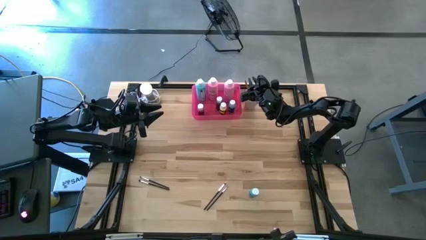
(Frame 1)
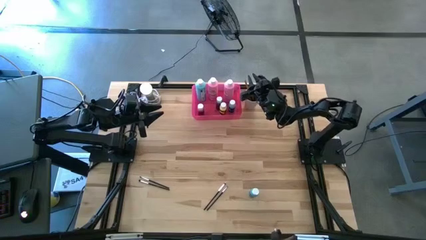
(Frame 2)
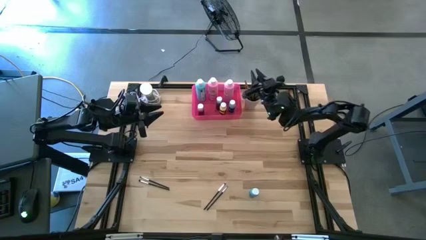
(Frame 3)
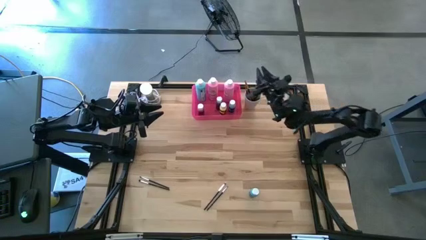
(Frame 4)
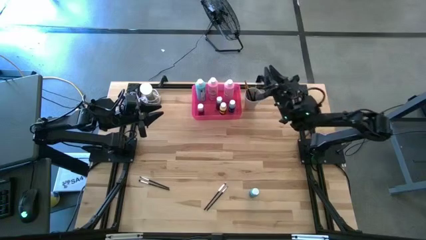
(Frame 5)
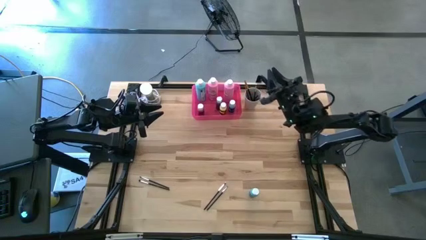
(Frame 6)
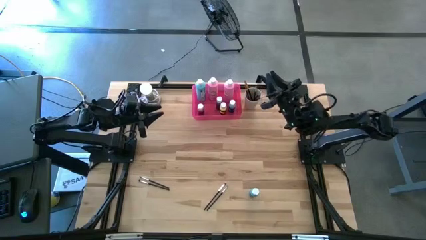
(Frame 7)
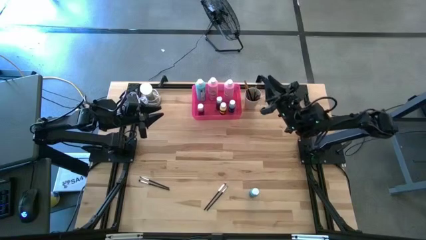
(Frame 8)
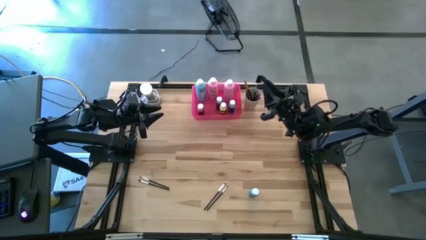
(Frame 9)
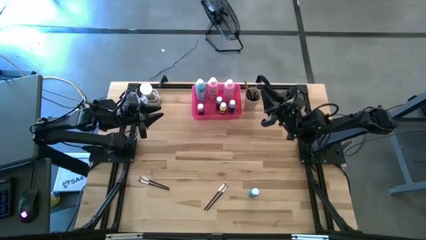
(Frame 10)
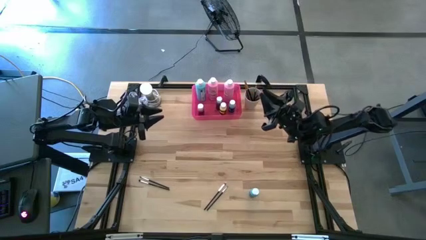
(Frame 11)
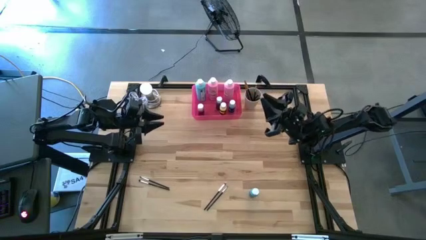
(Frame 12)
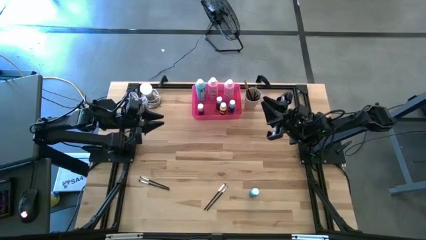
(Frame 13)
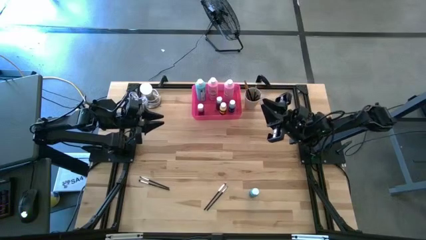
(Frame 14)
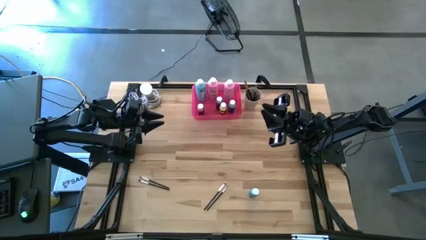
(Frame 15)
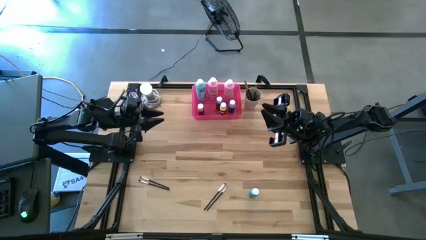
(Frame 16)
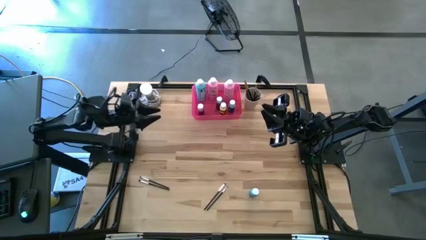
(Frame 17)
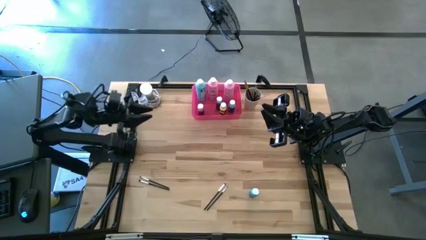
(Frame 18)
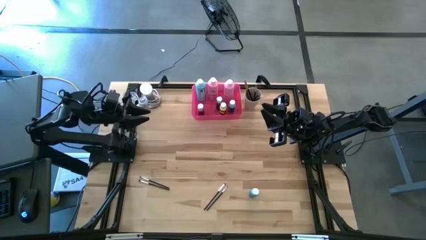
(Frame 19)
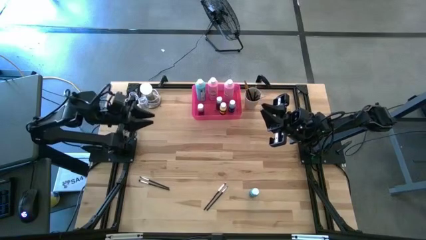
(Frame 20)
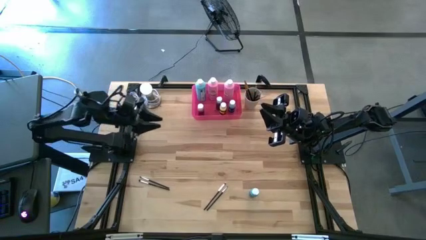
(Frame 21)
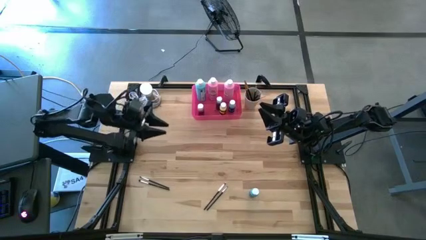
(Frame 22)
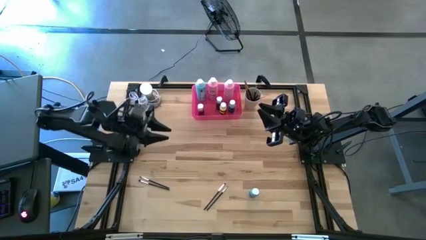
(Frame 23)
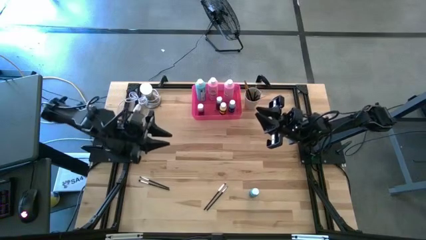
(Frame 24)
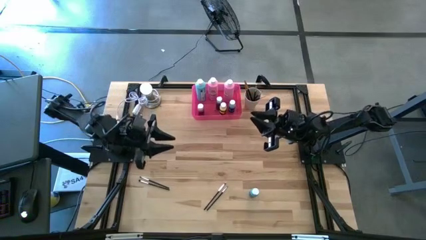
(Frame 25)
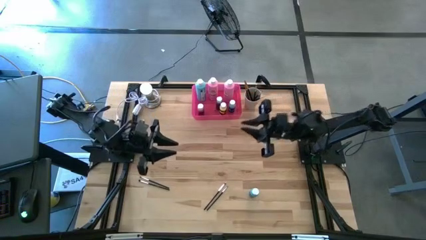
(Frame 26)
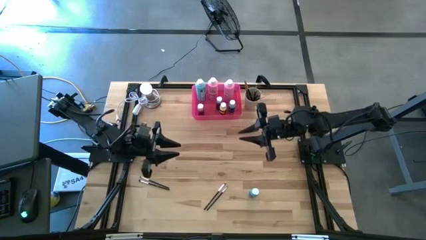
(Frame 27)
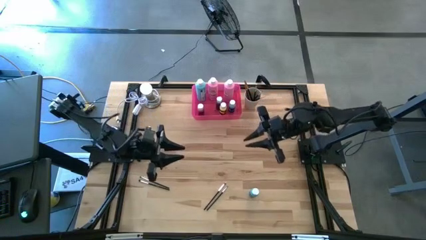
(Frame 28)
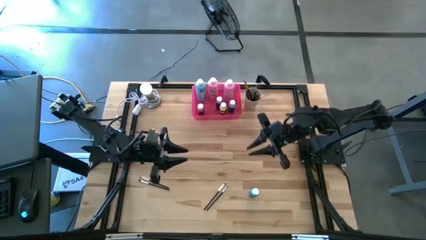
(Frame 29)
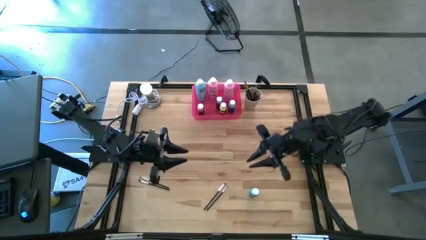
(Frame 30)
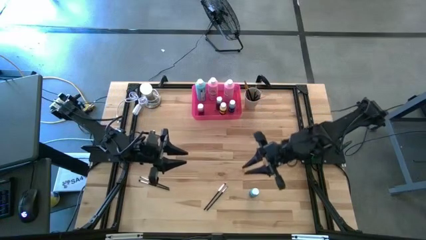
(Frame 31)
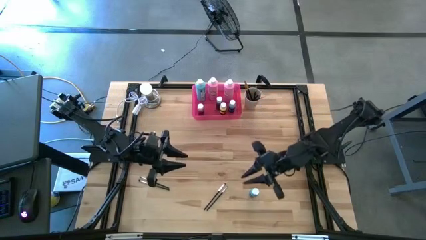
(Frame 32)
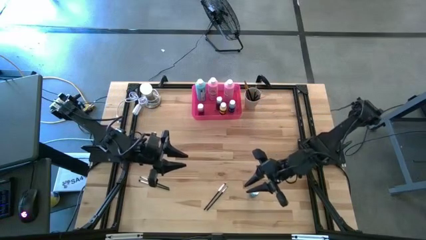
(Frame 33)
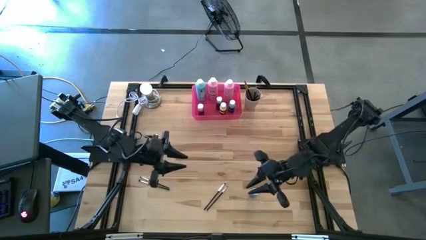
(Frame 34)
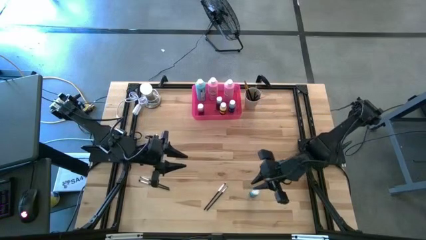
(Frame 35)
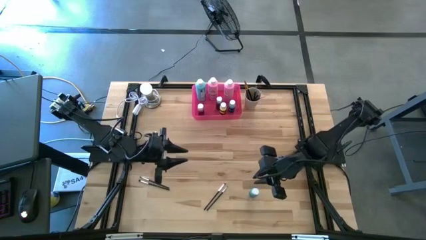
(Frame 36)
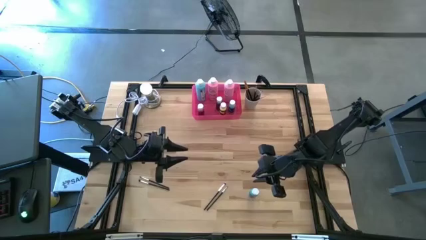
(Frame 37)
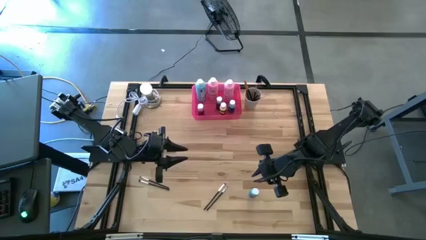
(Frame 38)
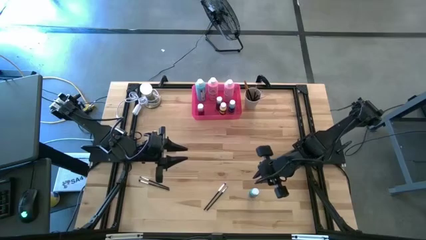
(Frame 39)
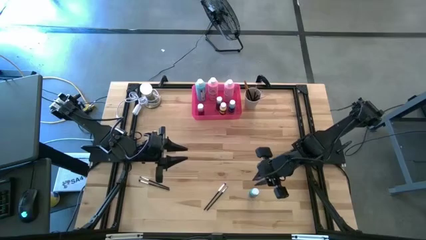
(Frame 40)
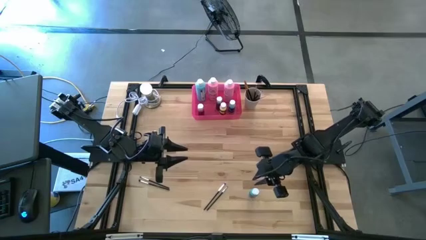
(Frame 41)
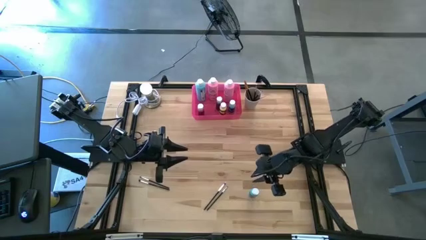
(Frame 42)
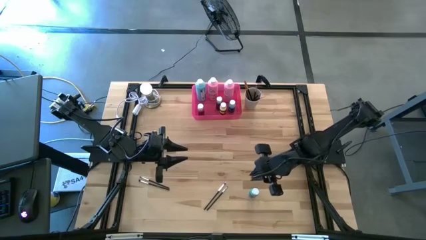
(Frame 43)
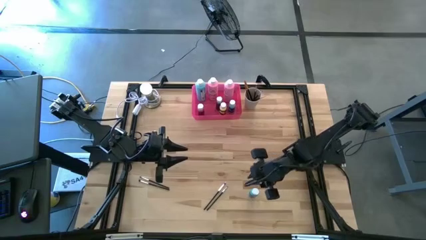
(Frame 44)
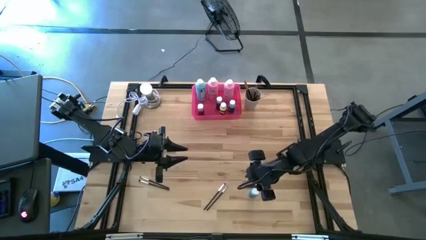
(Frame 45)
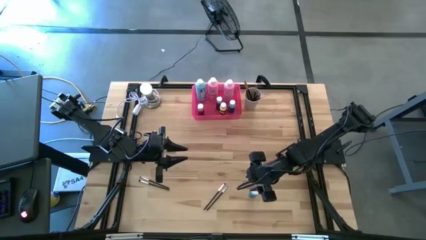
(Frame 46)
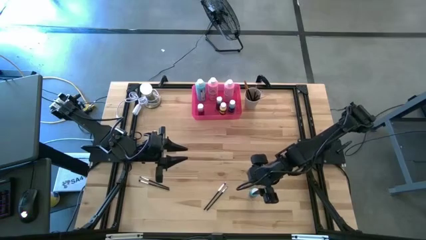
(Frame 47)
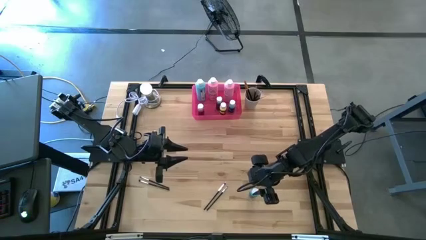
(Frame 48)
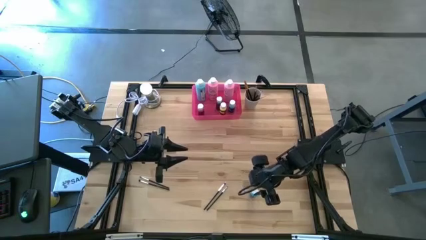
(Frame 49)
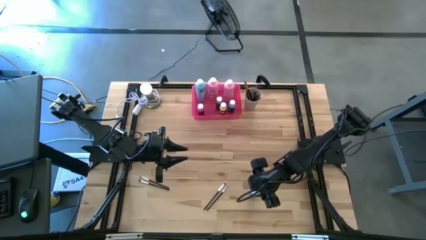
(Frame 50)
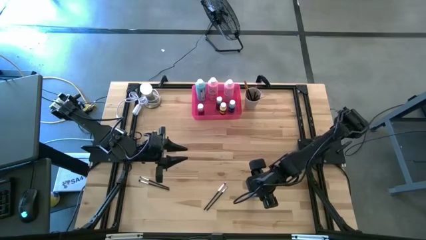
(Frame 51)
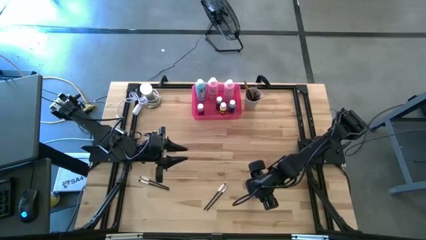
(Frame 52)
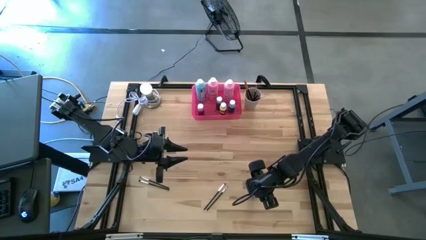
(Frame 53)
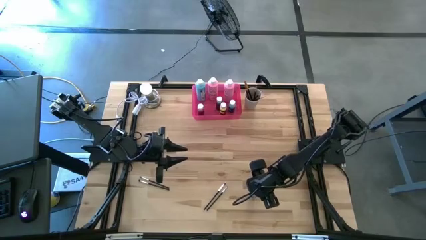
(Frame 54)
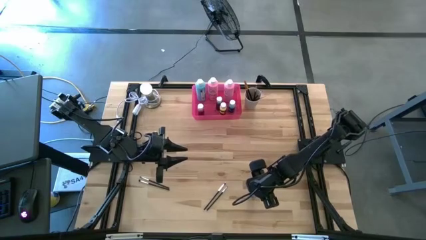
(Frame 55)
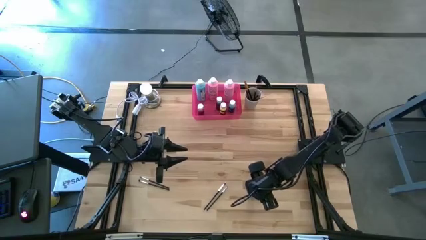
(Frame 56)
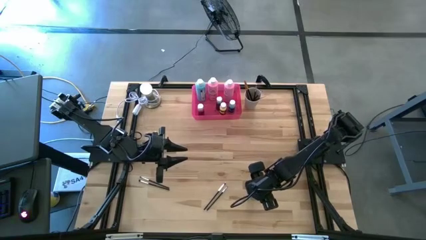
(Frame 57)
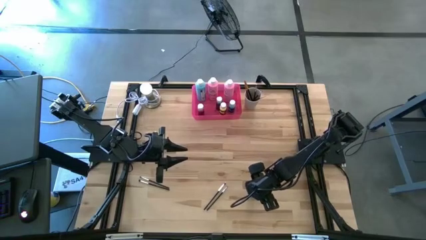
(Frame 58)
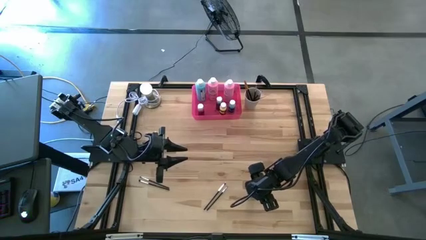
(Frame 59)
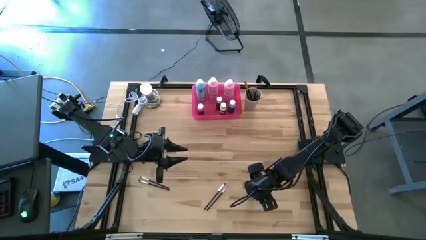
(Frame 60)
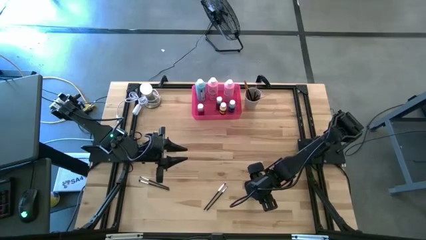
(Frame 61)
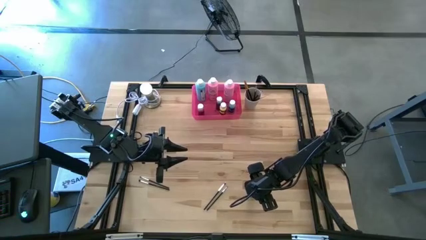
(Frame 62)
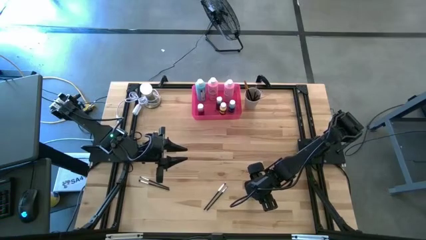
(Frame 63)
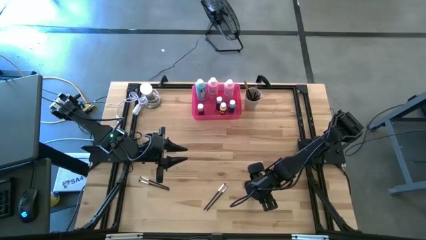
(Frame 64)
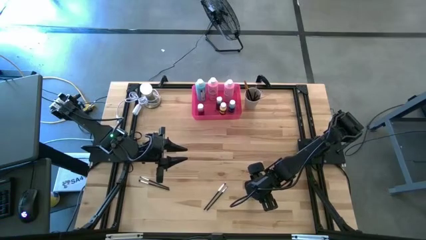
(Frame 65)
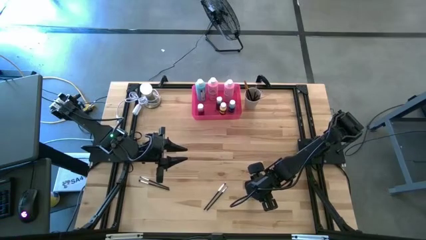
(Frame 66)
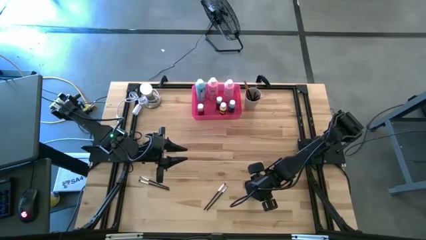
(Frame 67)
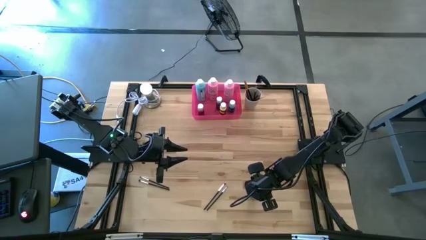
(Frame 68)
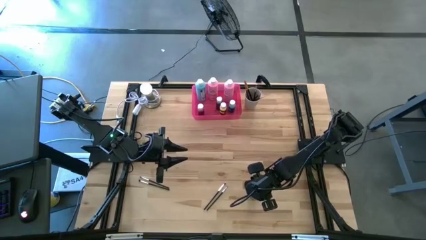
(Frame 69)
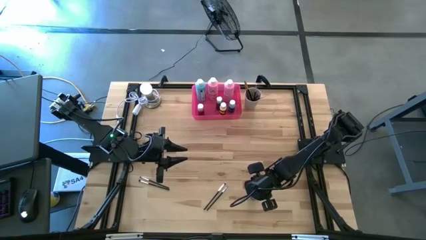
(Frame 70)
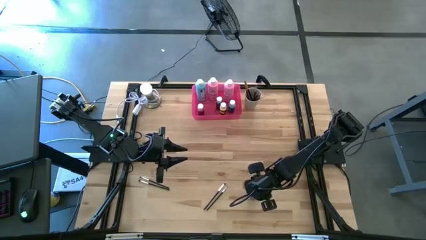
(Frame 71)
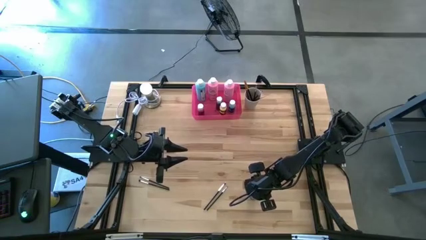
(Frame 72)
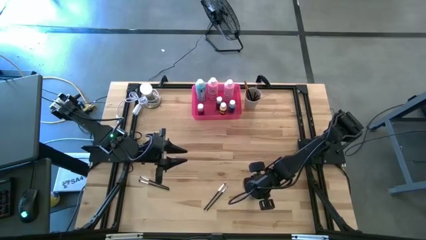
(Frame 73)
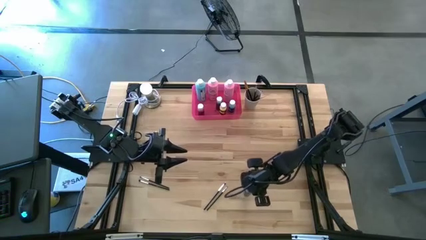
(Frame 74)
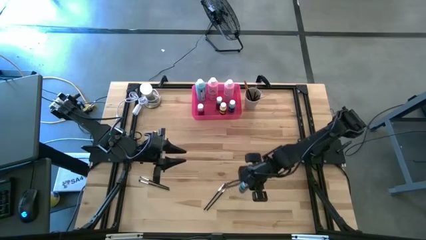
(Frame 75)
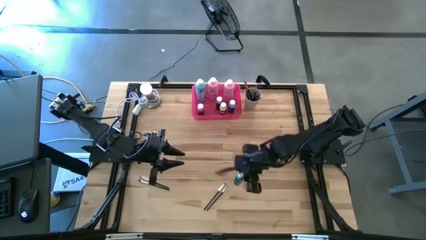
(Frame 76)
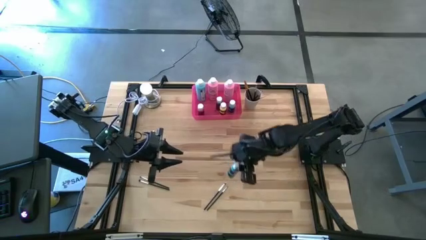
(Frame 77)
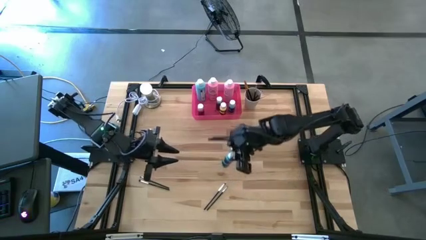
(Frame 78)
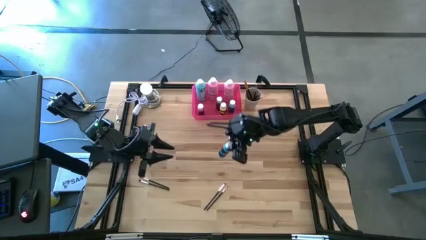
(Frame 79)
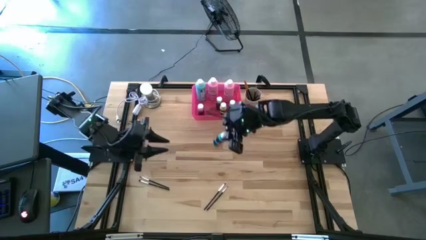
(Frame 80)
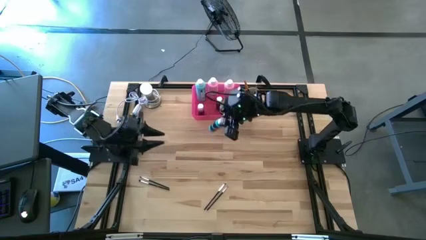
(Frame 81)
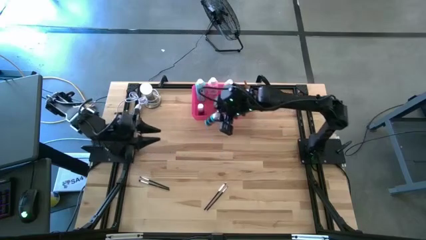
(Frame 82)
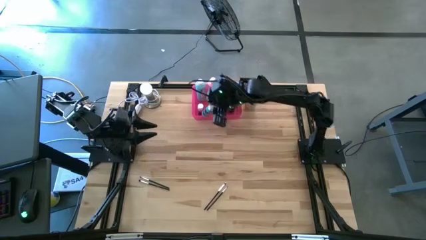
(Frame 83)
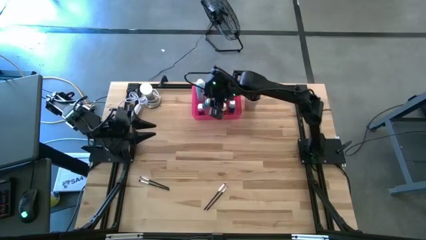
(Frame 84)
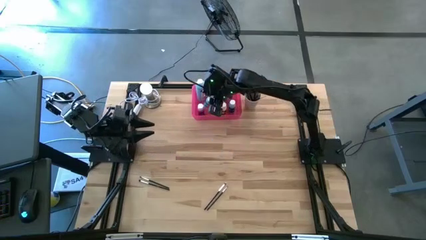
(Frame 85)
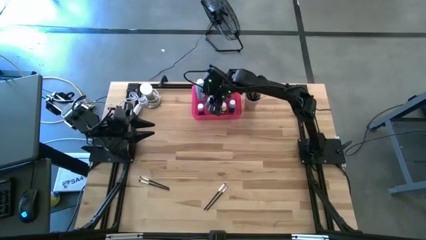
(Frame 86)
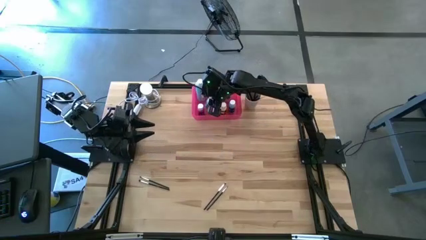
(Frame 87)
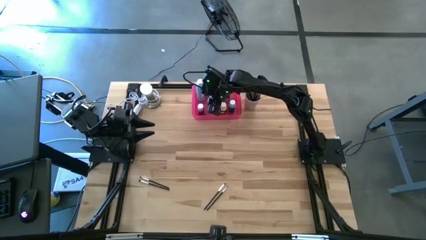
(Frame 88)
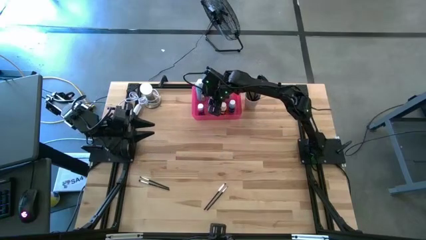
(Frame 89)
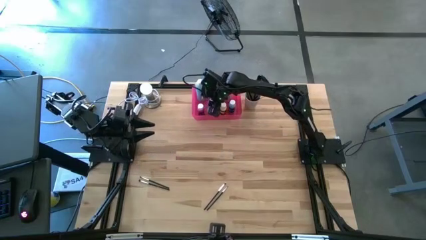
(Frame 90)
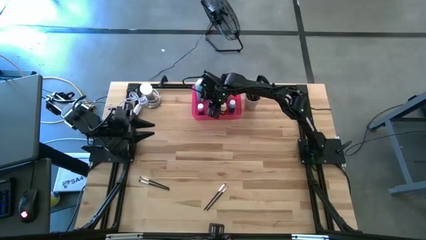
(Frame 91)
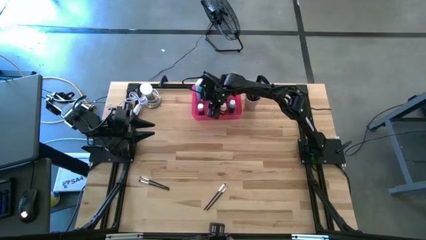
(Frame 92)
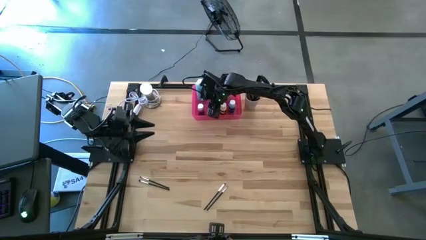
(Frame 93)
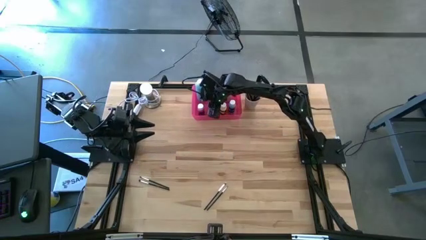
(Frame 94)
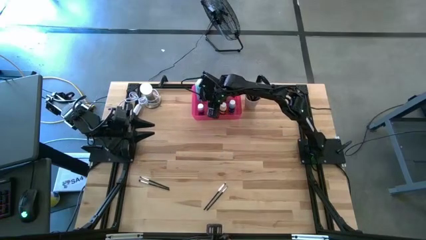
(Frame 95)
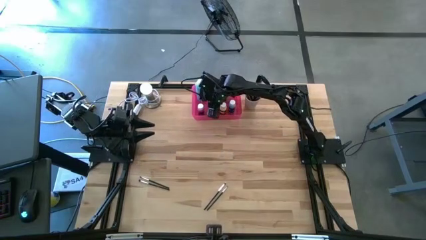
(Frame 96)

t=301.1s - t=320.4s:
Task: Pick & Place Paint Supplies
Put the small blue paint bottle into the pink bin
